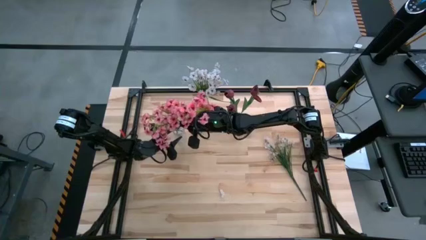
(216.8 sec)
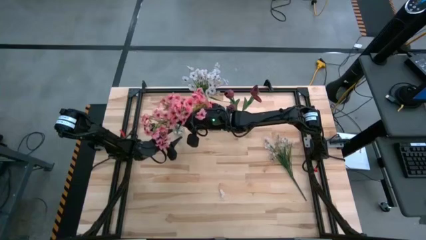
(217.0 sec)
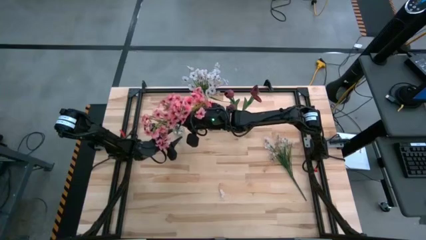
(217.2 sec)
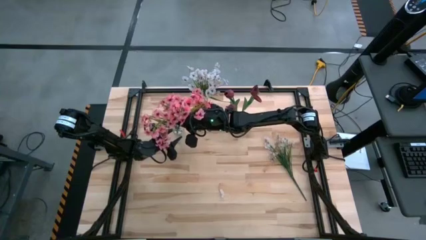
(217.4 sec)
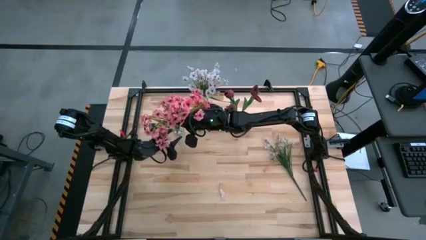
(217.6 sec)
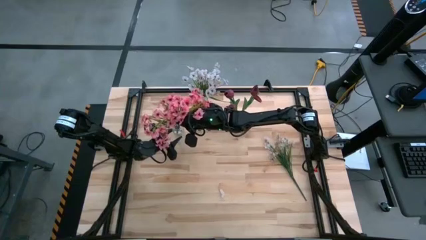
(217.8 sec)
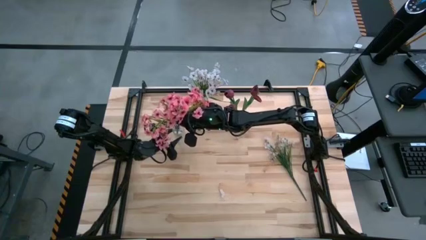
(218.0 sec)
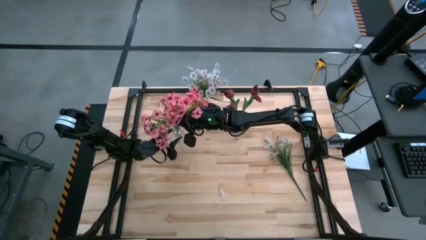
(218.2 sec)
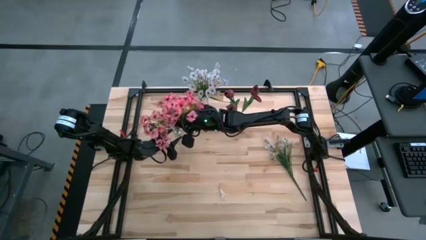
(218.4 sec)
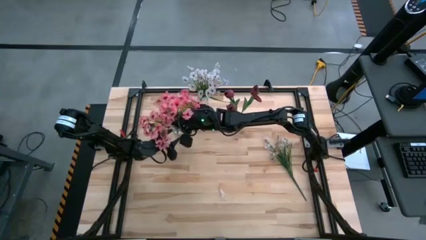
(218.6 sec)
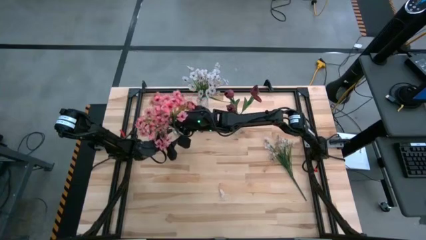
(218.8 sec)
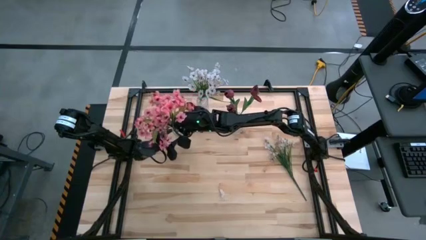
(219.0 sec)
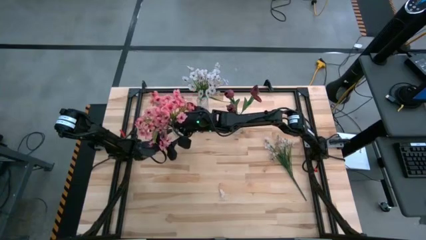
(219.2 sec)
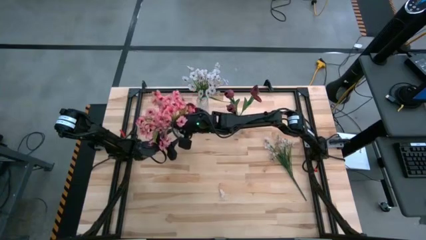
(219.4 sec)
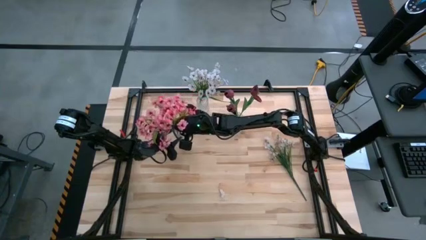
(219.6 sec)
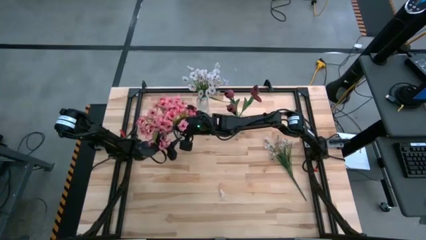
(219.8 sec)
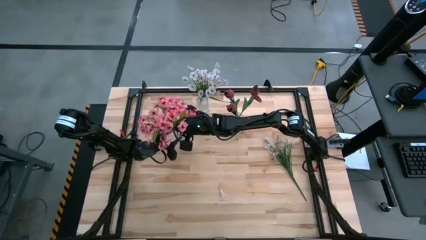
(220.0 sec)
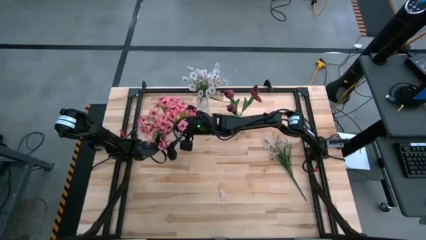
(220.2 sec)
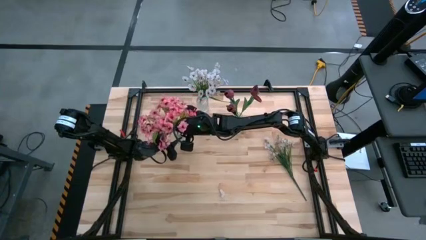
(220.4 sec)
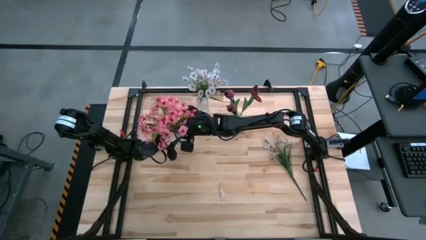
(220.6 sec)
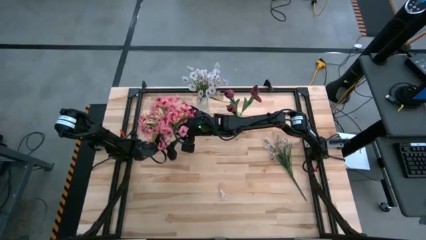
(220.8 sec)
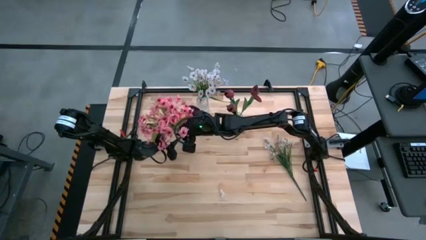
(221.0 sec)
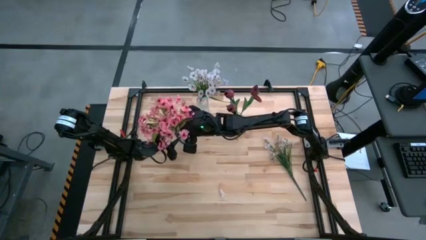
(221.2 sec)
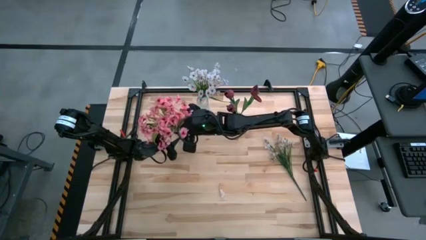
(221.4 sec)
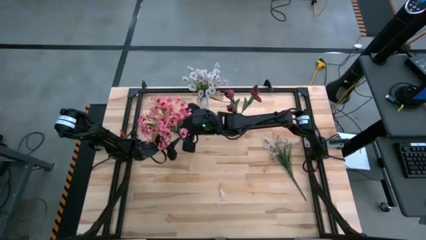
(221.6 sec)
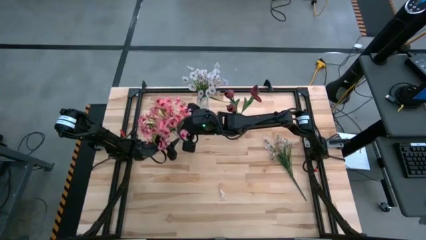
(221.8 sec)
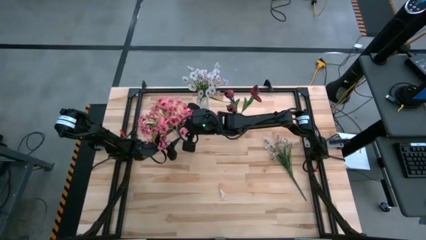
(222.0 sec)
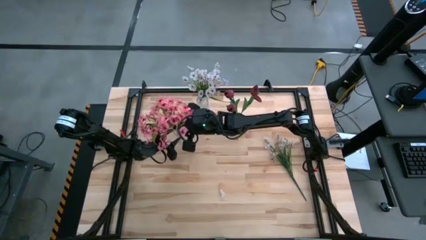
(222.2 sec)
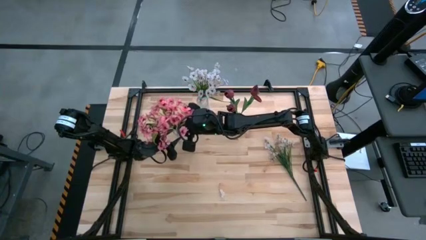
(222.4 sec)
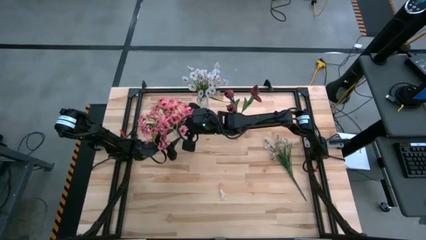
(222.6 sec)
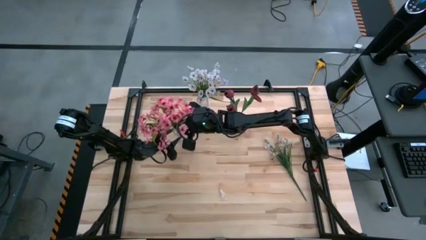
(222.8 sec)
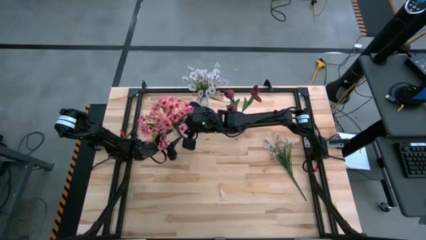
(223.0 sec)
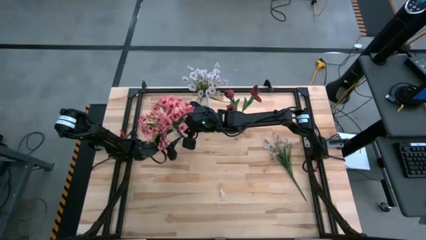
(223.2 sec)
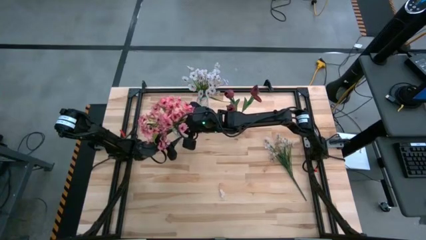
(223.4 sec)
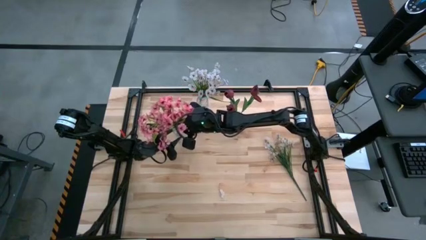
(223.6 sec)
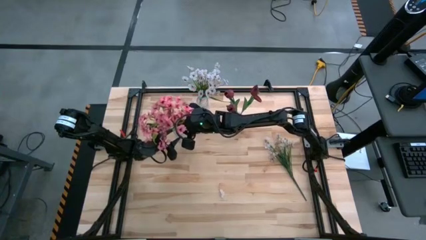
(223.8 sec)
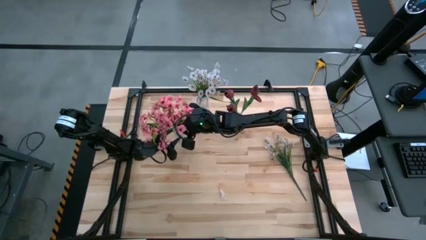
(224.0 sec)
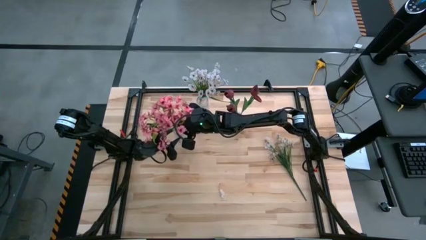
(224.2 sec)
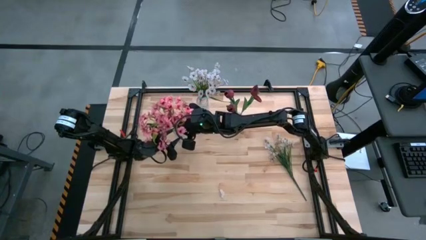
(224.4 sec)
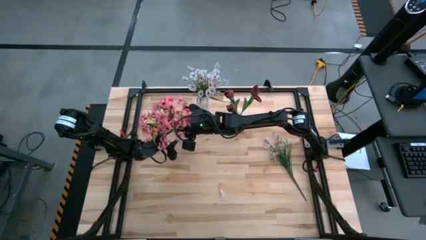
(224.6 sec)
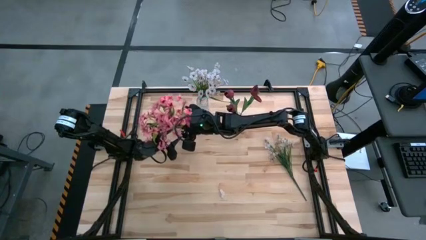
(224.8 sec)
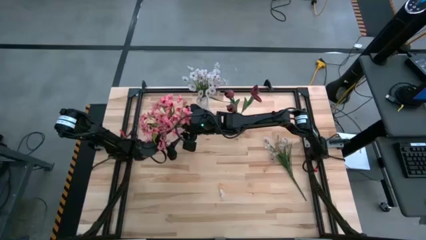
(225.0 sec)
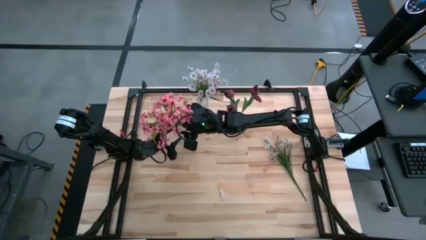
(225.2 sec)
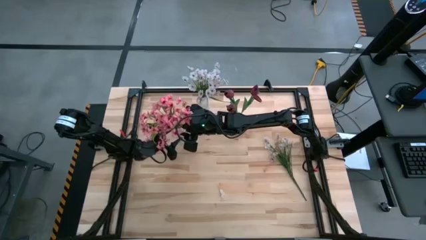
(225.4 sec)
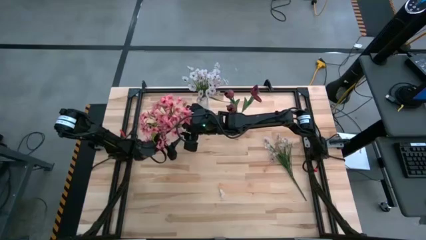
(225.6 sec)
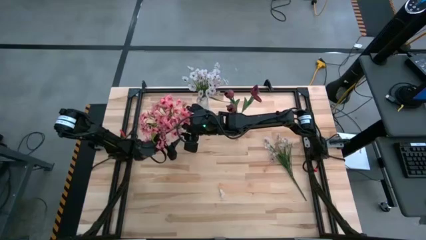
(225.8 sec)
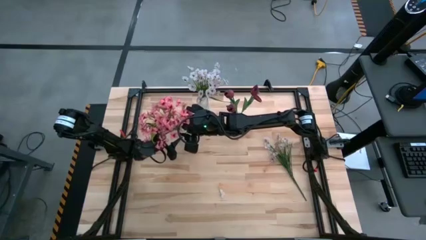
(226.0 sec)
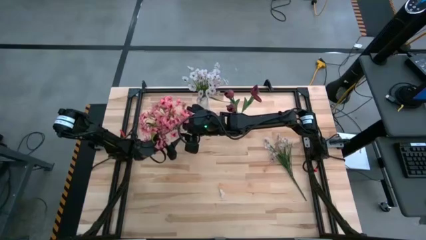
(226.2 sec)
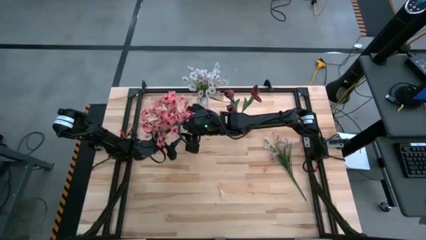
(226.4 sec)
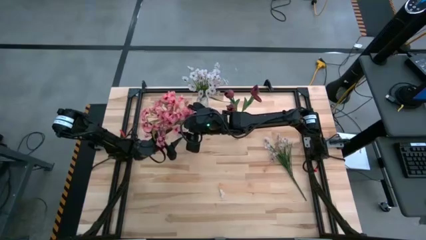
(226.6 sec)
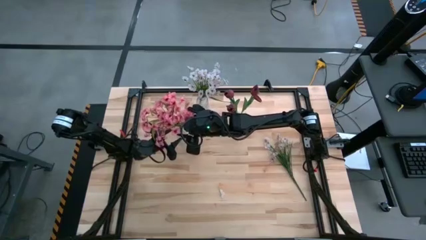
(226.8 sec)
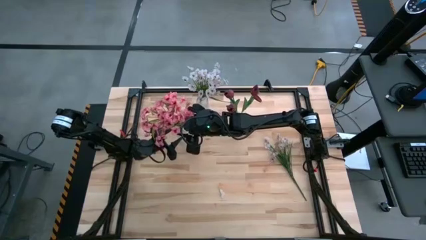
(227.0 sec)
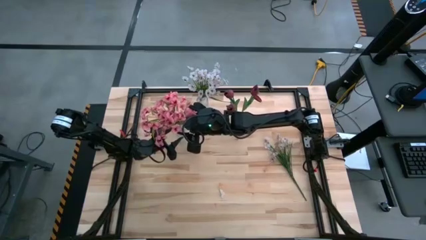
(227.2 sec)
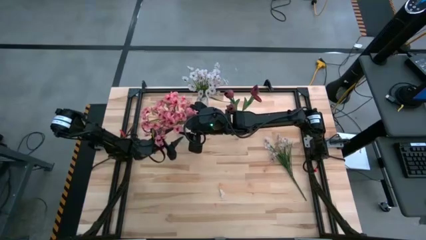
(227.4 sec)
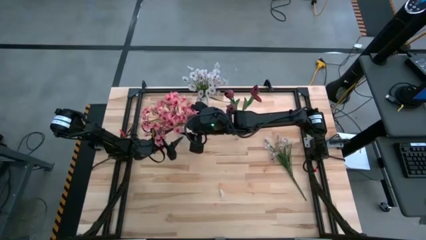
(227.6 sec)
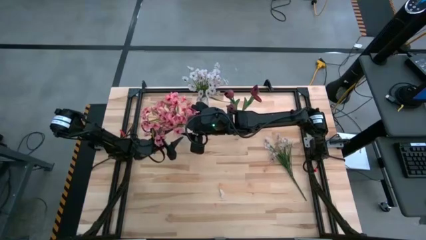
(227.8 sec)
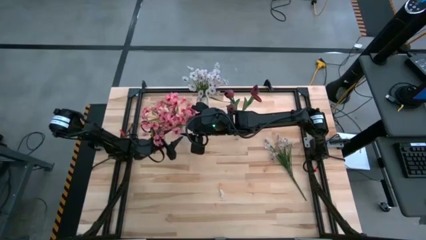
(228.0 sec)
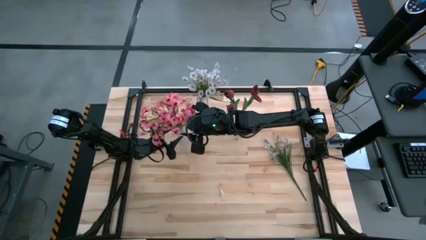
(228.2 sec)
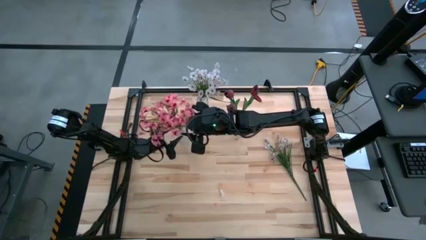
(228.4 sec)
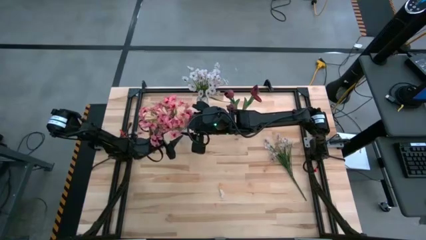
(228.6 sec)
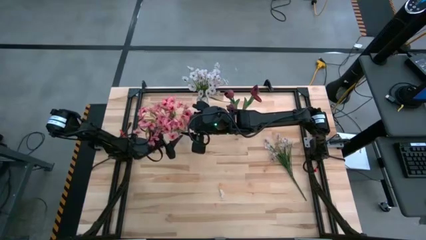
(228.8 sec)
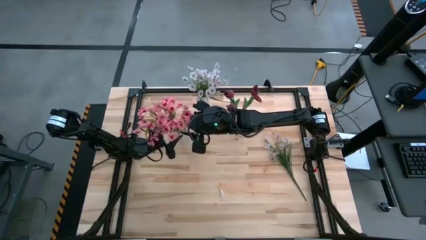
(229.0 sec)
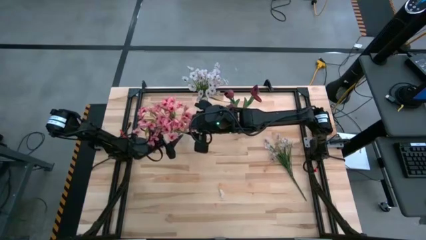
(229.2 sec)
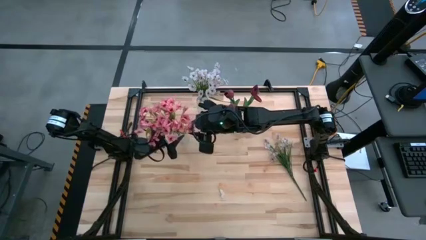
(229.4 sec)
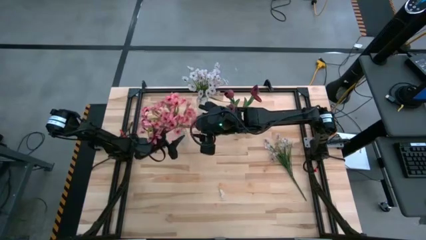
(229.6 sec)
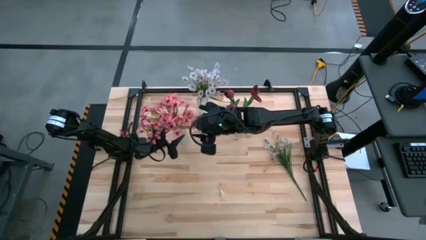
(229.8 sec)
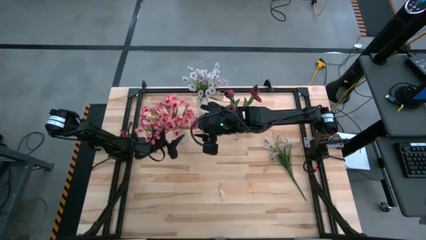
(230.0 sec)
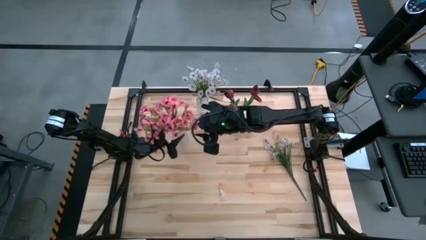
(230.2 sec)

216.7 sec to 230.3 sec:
Task: Sort flowers into vase by color
Put the pink flower into the bottom left transparent vase
